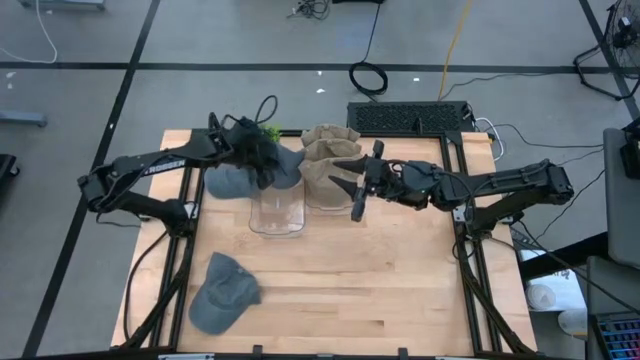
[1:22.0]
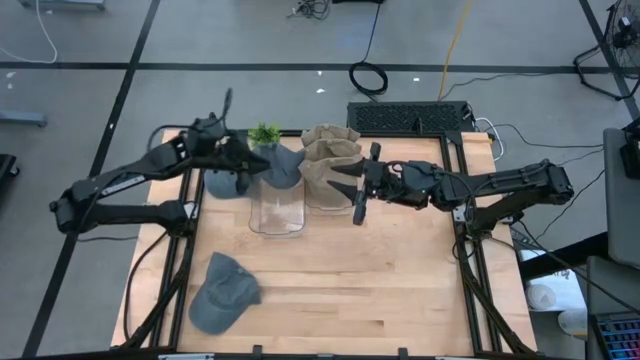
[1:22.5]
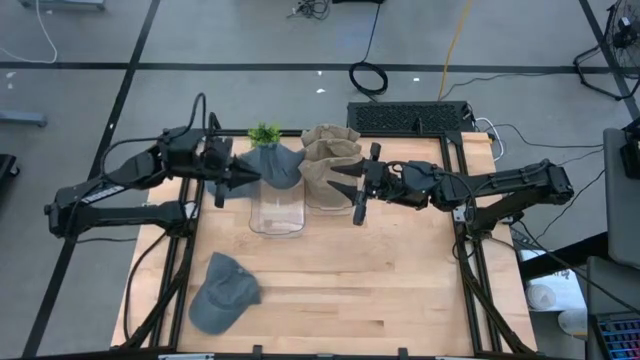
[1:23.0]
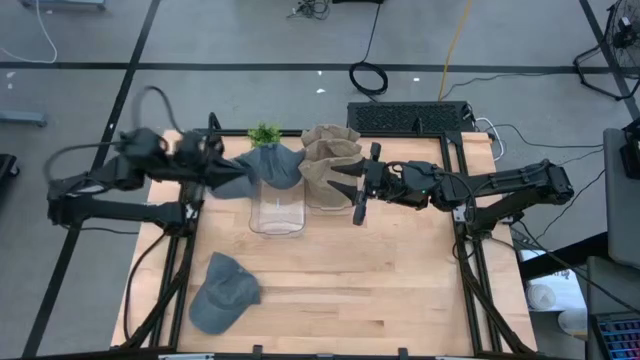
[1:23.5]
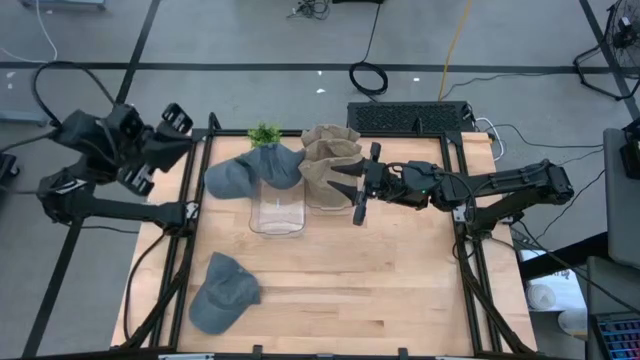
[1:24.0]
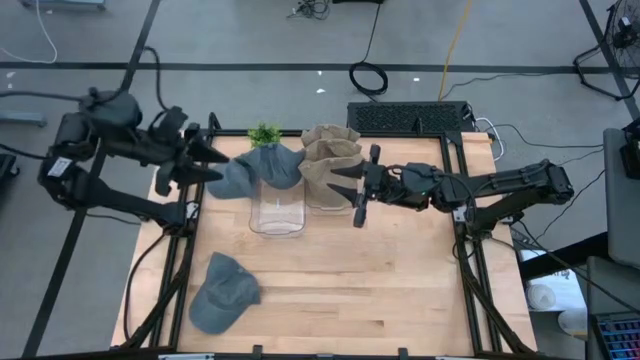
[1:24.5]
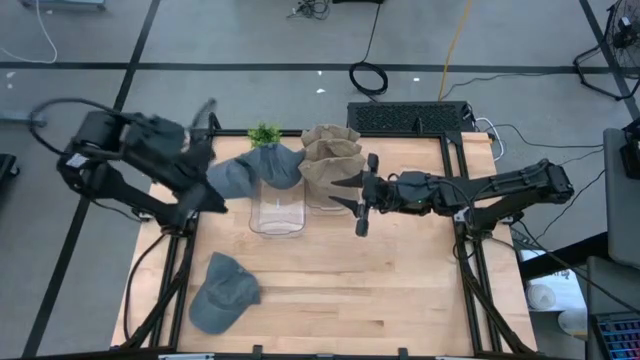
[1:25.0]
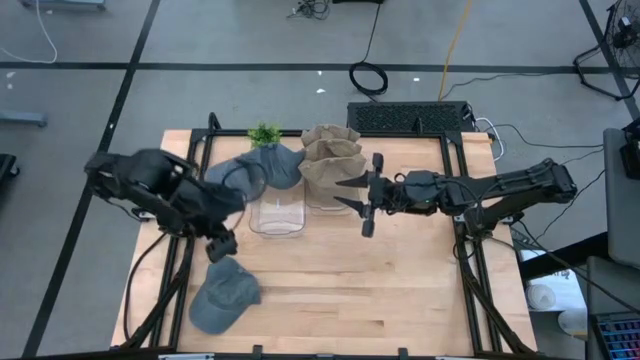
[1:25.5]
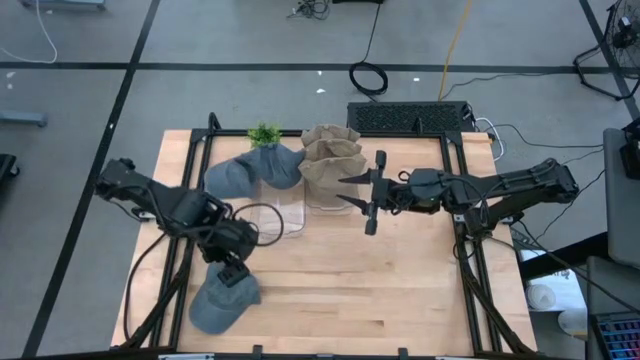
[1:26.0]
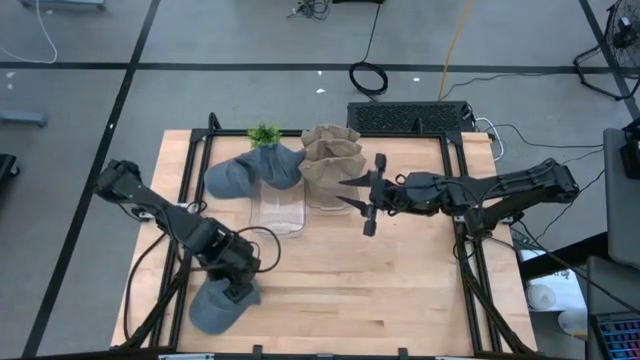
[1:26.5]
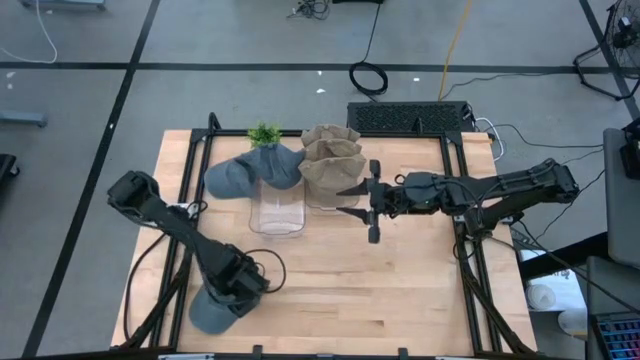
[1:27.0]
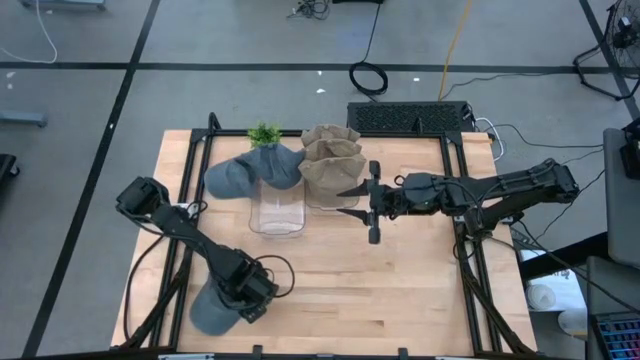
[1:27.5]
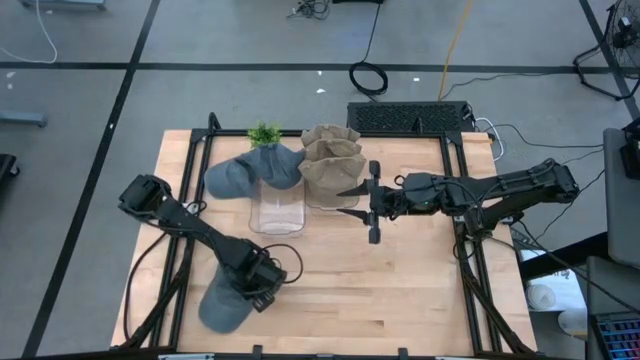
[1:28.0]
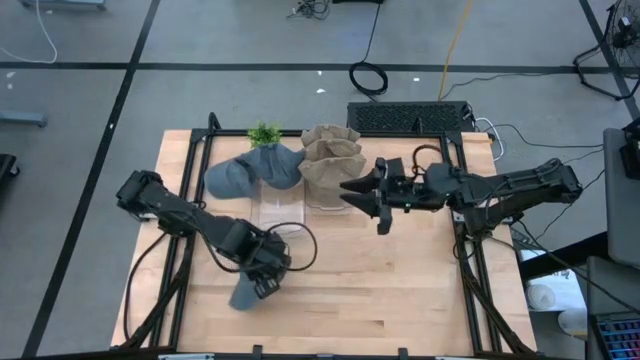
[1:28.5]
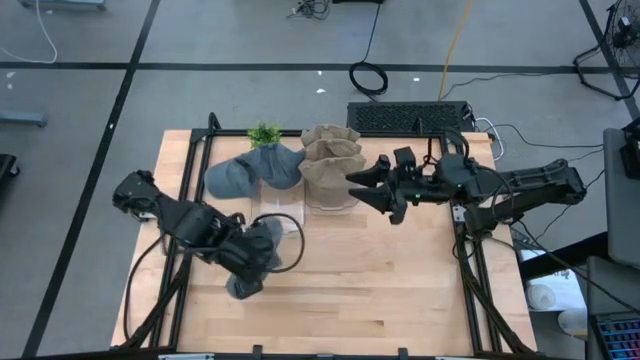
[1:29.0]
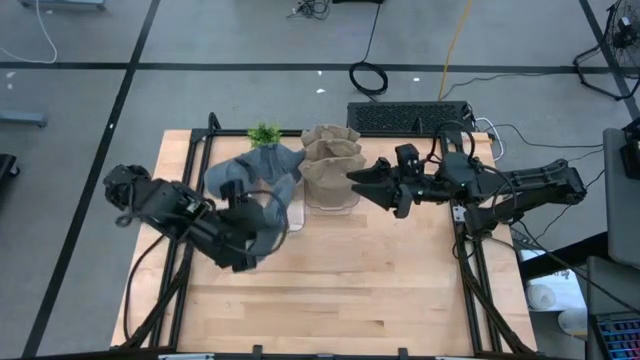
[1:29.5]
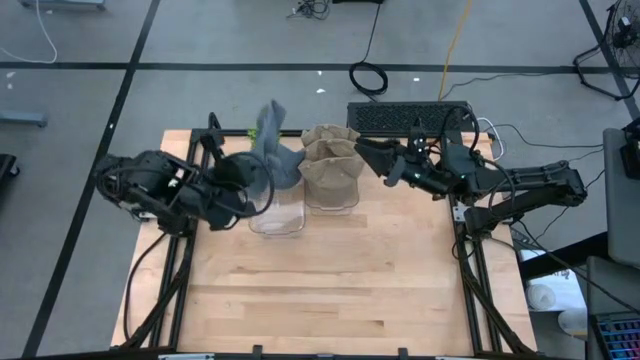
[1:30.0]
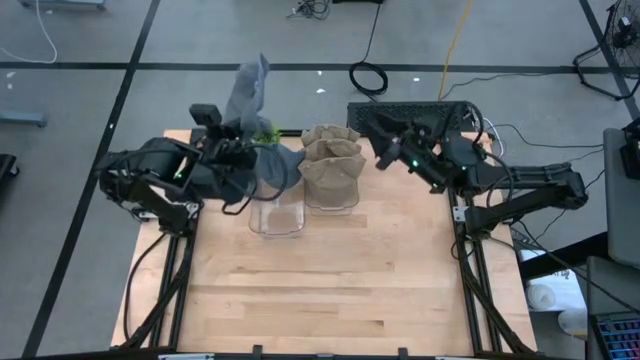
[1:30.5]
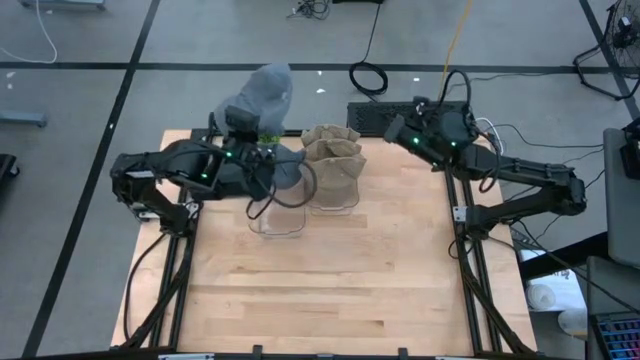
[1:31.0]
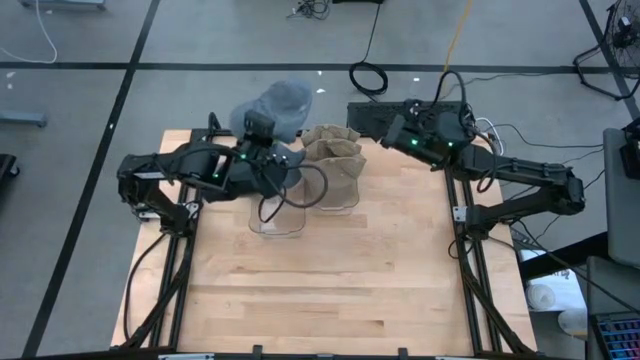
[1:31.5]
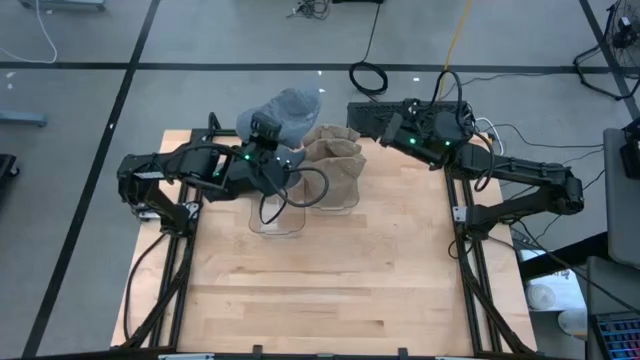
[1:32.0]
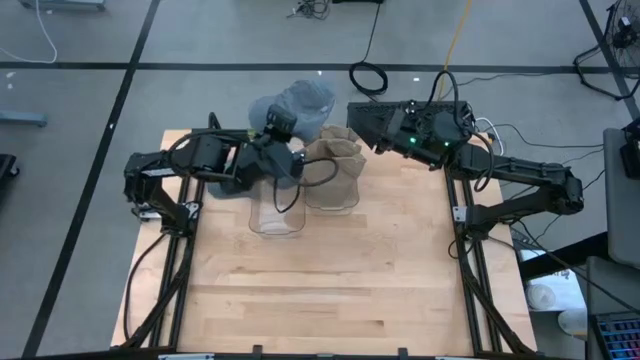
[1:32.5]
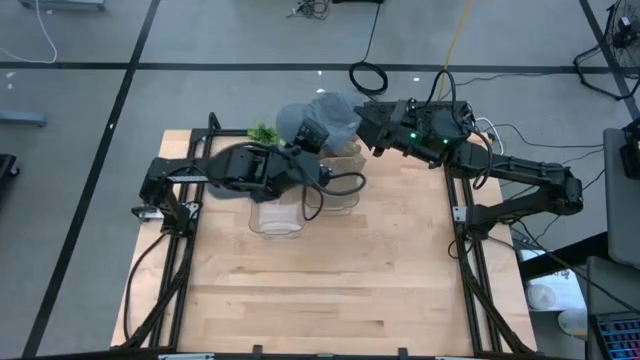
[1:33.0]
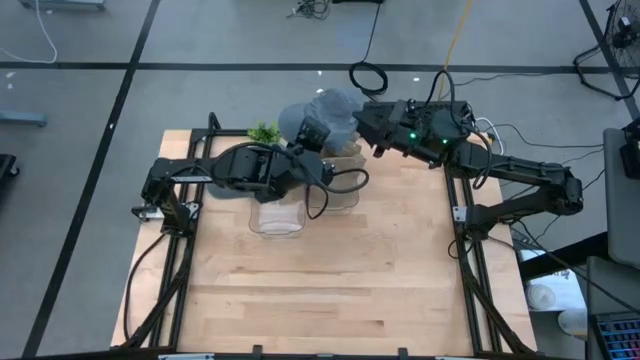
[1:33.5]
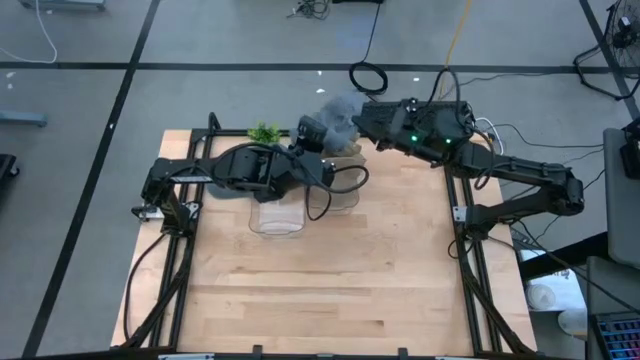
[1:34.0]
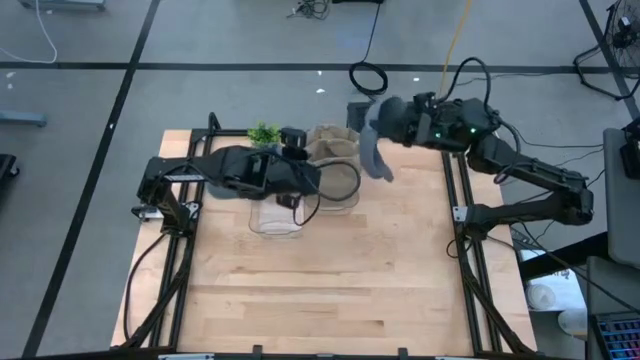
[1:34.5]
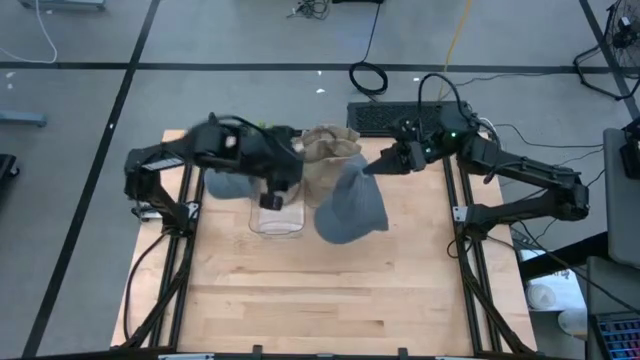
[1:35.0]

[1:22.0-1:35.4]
Task: Pick & Place hat
Put the bottom blue cap into the left transparent bin

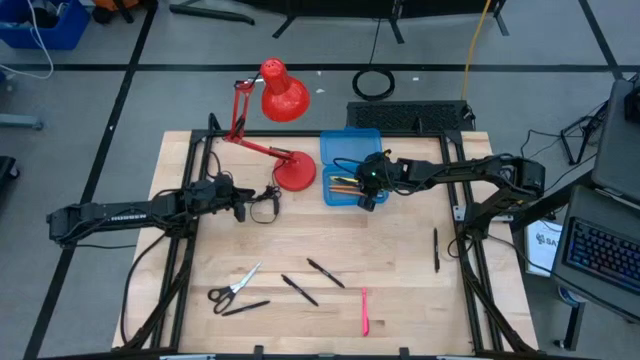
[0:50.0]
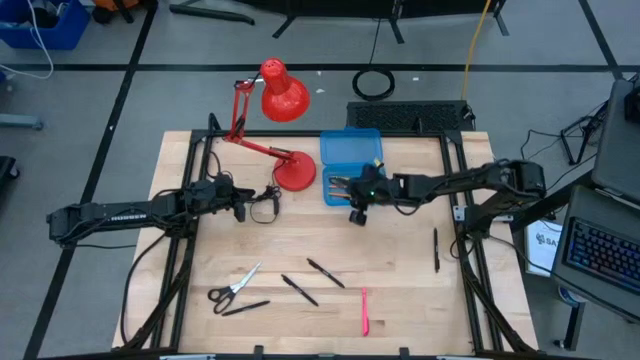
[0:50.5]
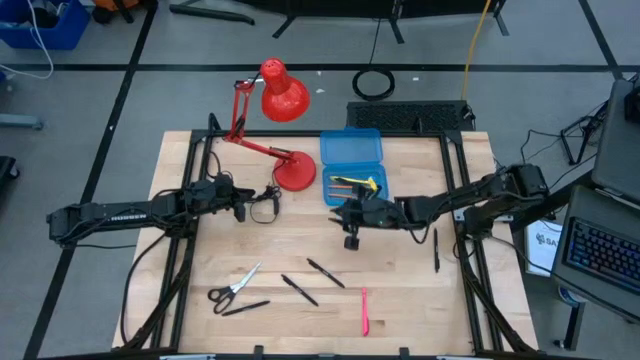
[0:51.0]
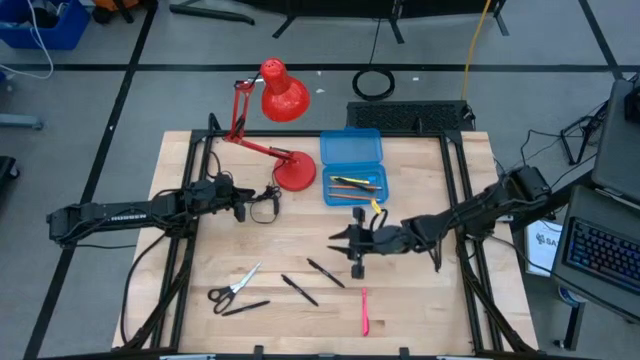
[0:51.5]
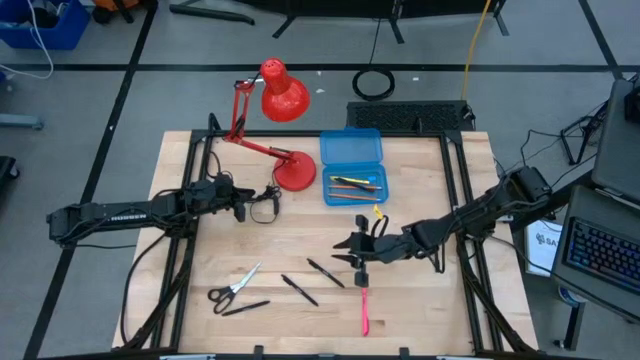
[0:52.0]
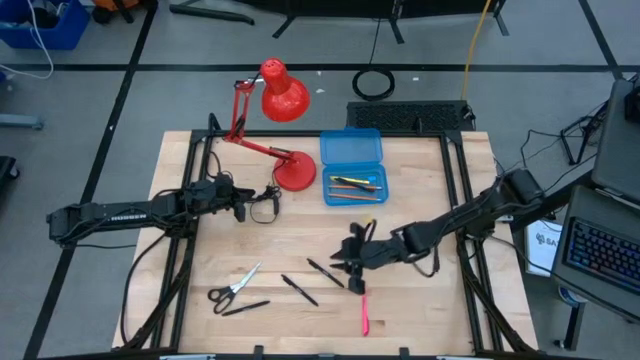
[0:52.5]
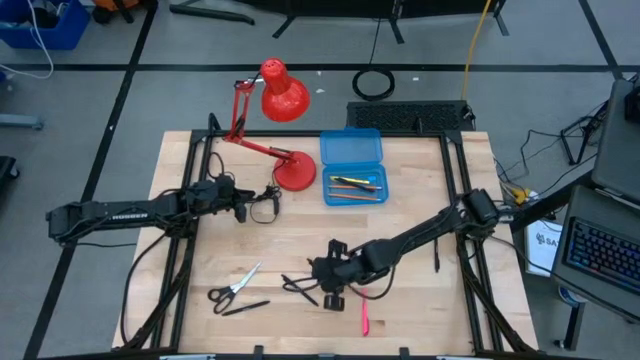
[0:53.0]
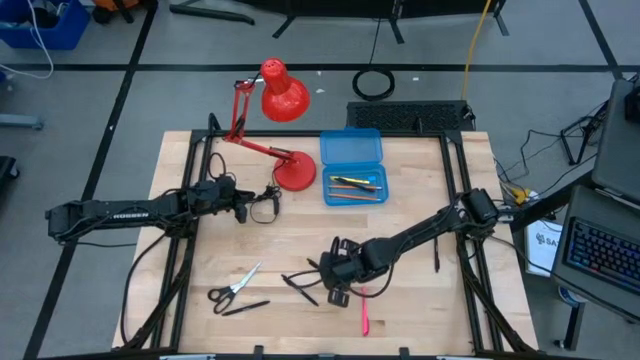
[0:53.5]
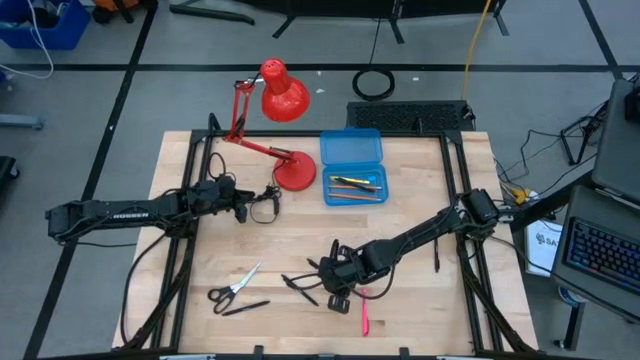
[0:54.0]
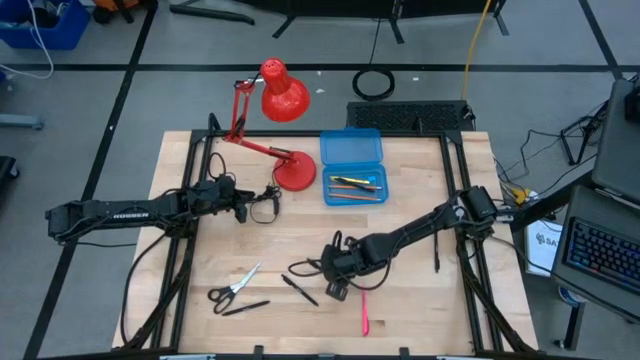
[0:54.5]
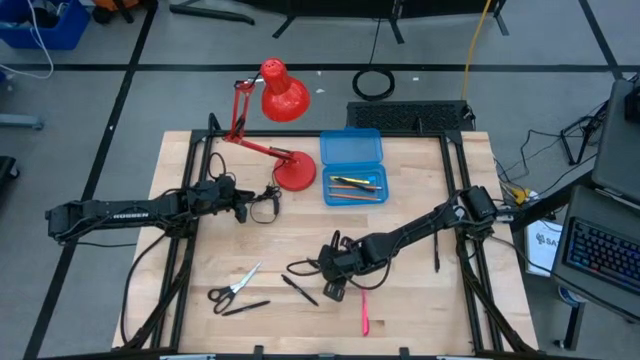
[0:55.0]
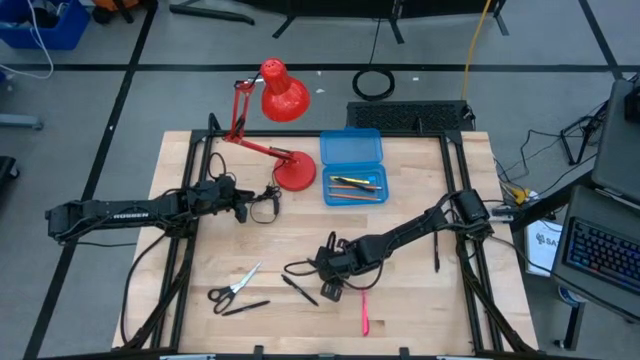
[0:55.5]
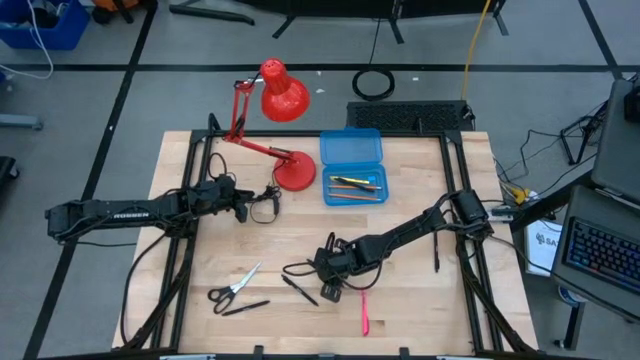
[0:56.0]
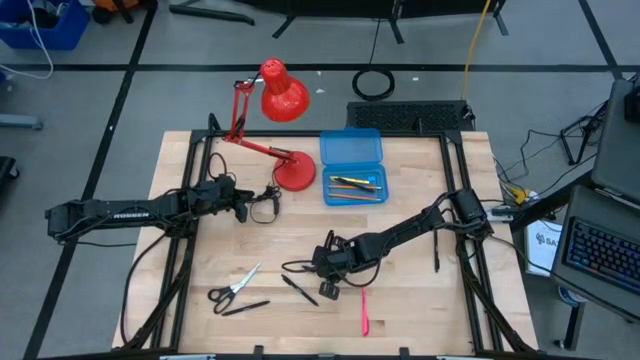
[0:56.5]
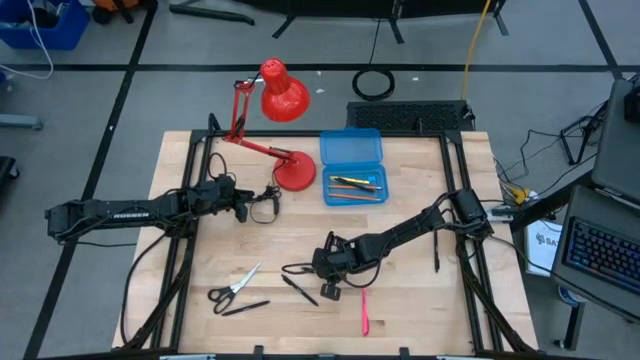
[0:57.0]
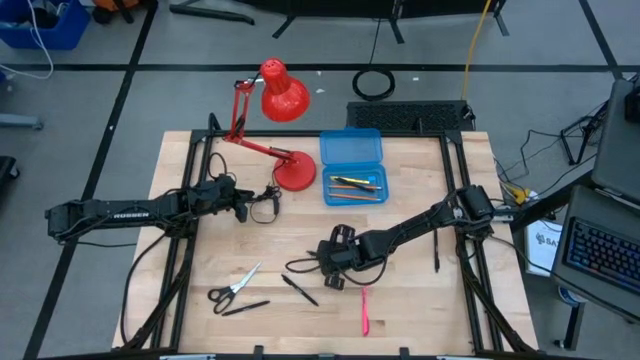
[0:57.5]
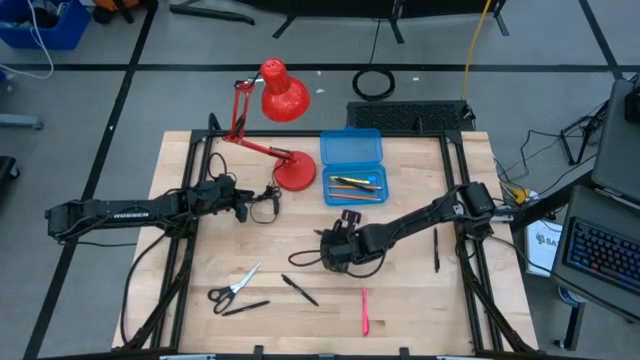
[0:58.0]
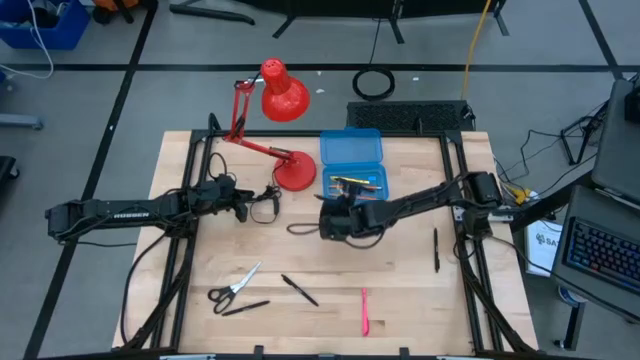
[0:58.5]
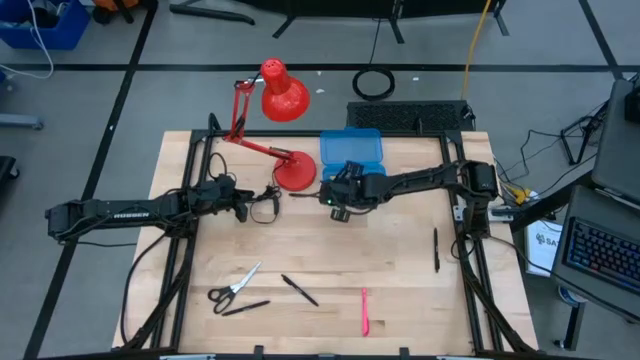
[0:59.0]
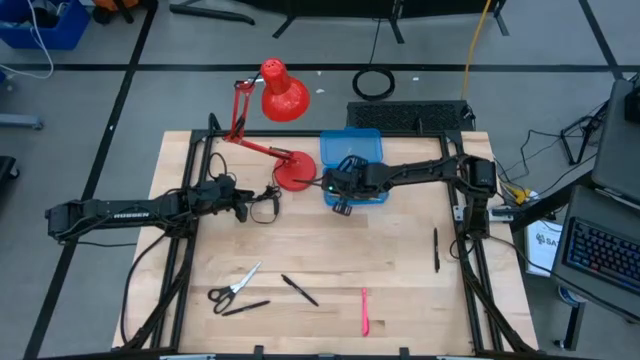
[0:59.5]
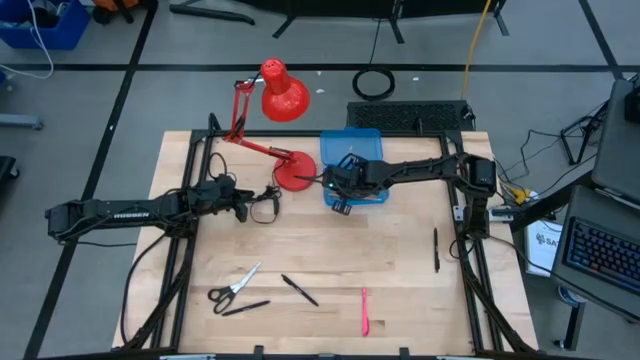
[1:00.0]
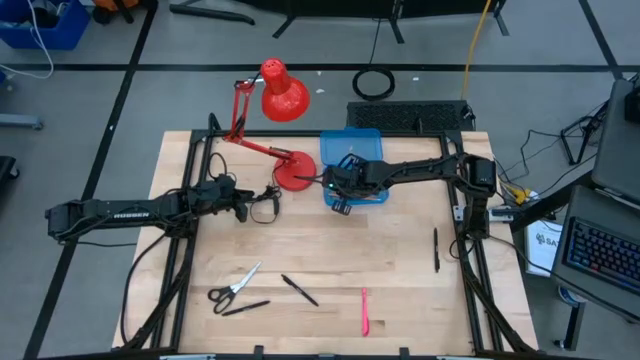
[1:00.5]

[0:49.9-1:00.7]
Task: Pick & place school supplies into a supply box
Put the black pen into the blue supply box
